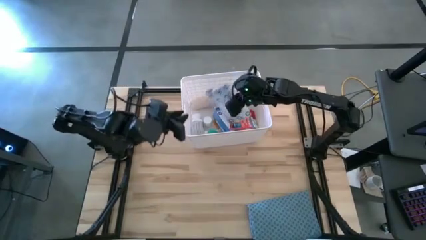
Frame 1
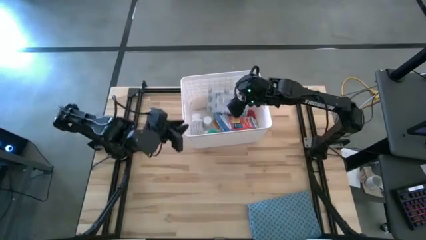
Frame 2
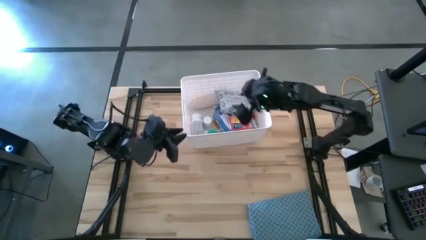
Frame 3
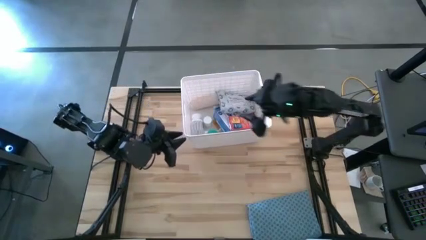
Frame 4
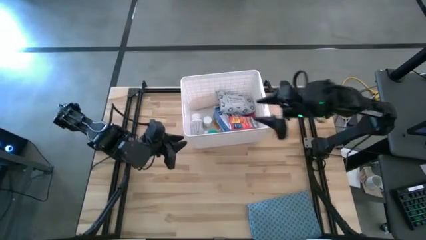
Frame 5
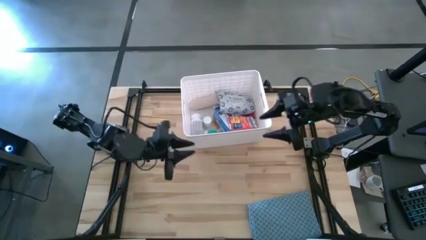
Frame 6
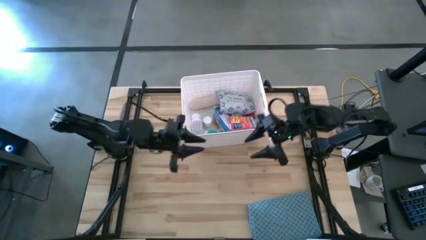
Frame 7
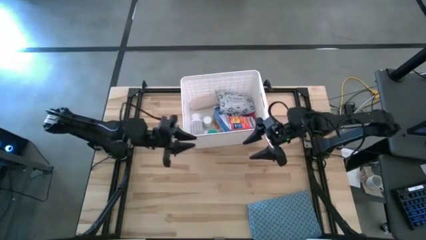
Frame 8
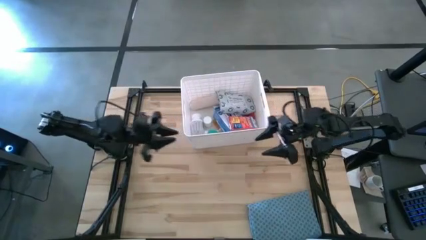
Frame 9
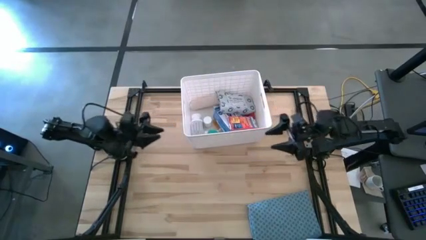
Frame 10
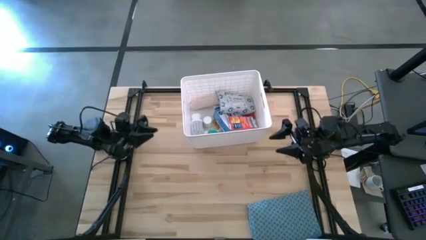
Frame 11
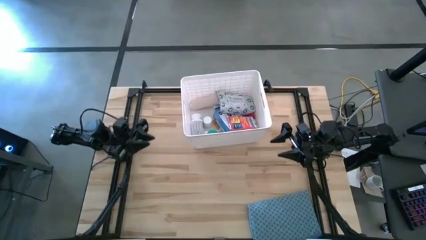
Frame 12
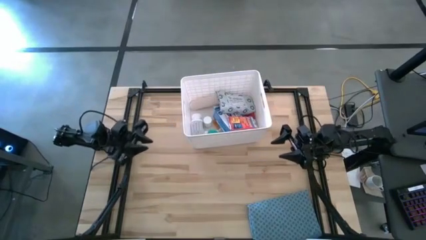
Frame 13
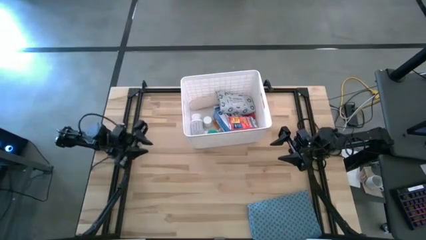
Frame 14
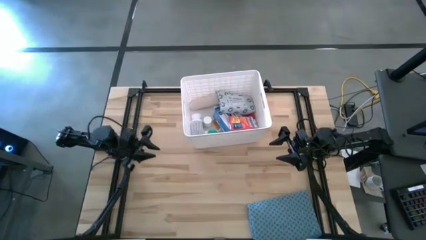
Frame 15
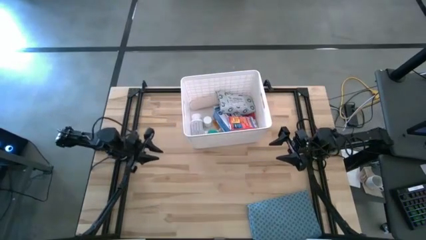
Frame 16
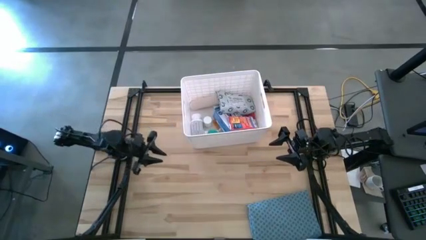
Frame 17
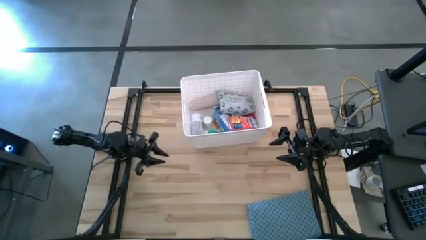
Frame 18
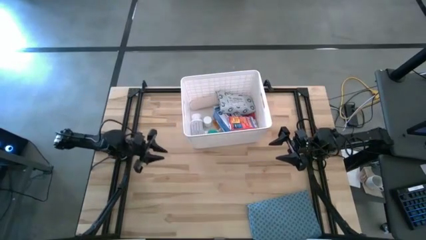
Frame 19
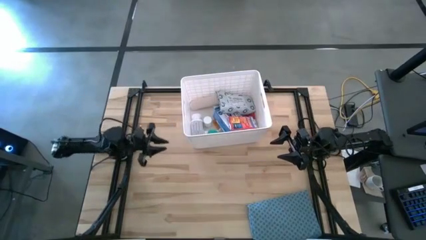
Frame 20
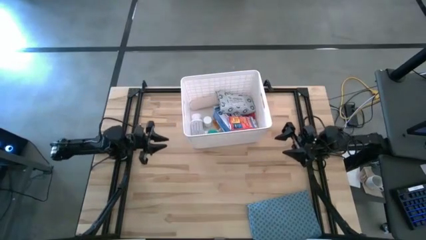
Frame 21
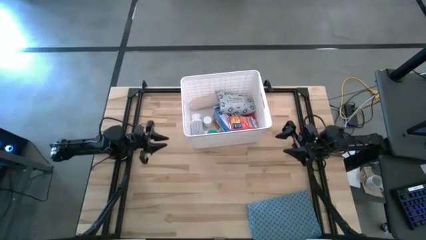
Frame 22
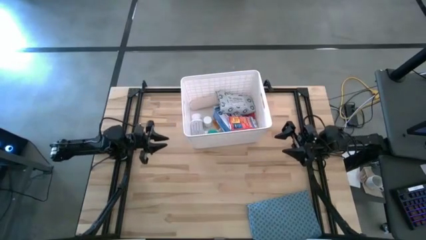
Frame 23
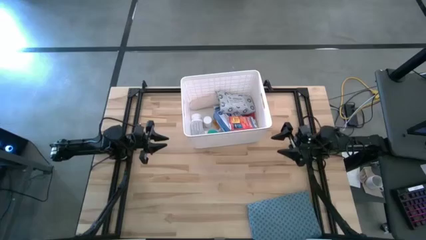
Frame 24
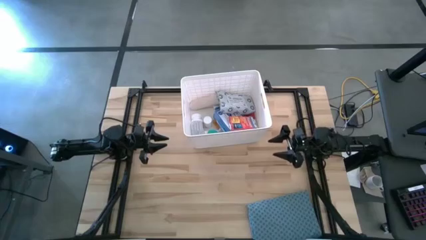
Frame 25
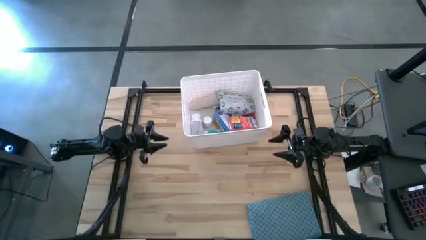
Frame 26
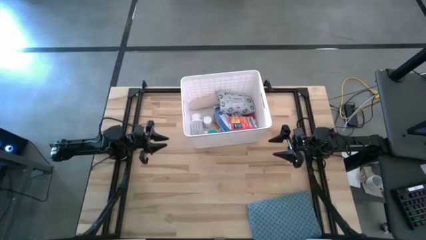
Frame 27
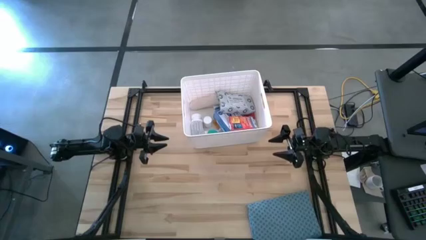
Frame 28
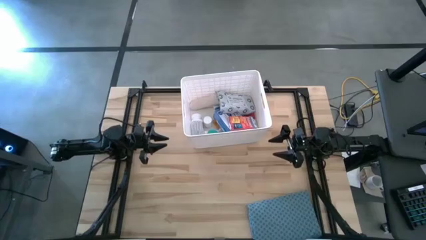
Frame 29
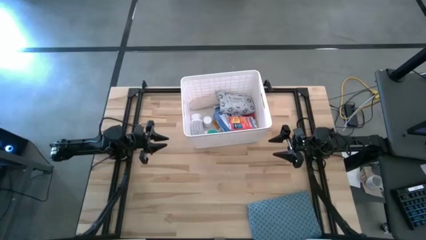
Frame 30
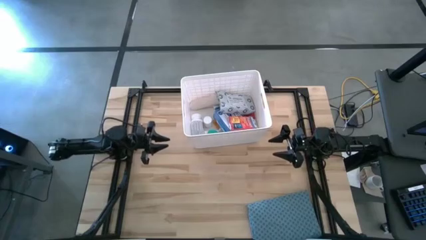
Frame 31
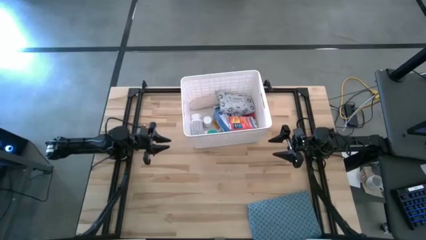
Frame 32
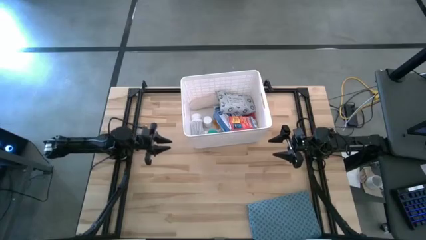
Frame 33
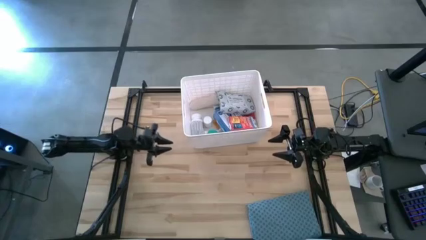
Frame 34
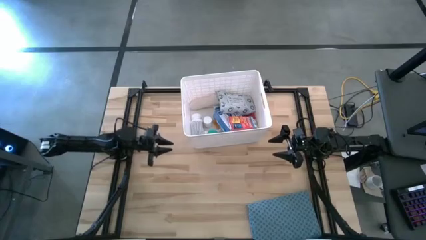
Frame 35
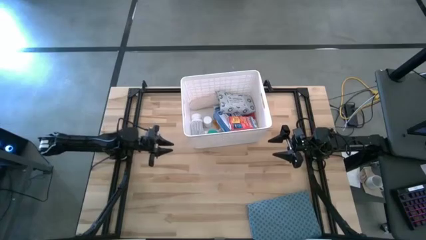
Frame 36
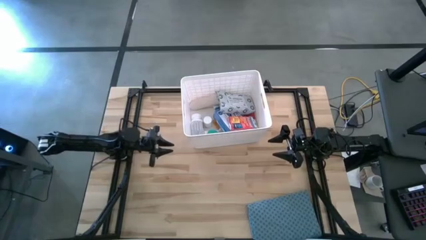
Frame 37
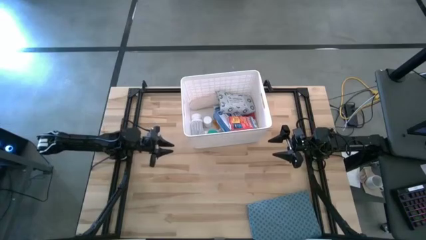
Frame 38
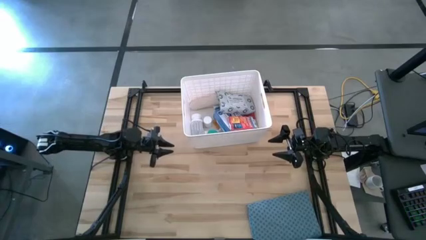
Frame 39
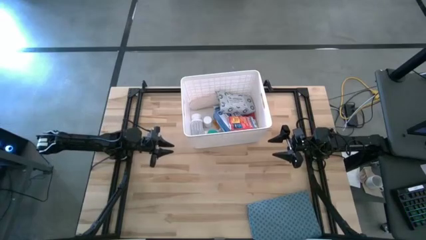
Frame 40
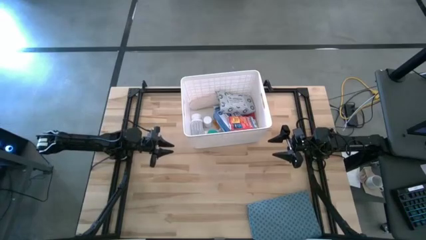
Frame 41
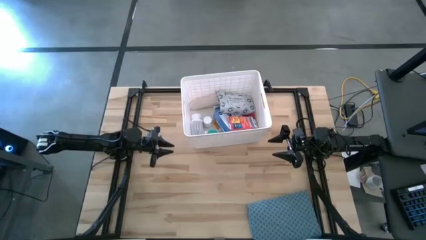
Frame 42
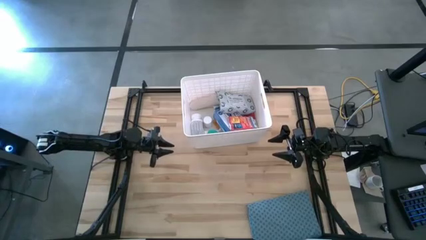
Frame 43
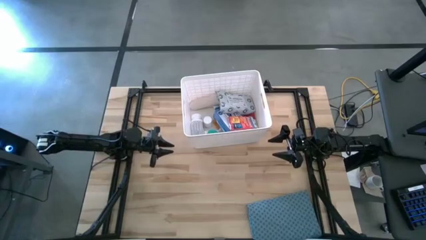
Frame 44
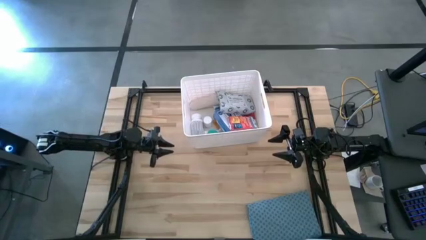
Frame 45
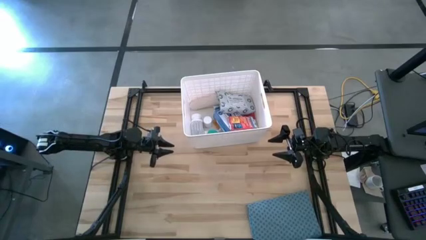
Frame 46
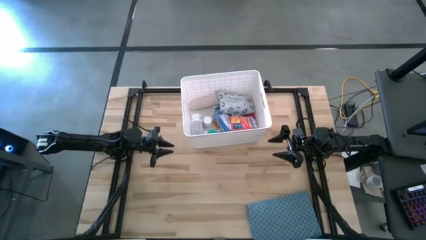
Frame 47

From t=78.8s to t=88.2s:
Task: Pick & place medical supplies in basket/bin
Return to Home Position

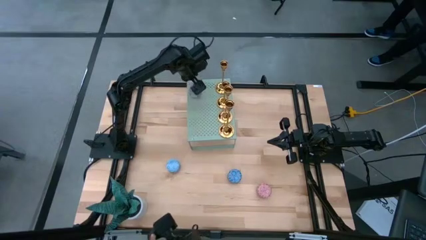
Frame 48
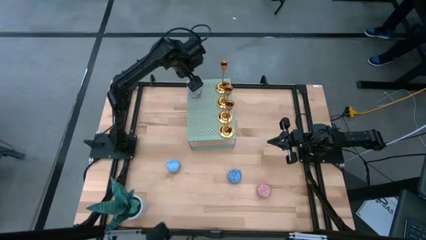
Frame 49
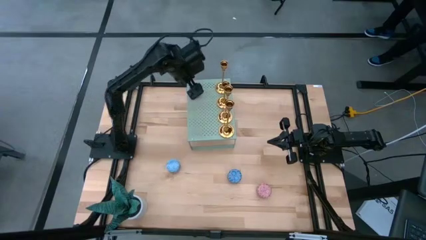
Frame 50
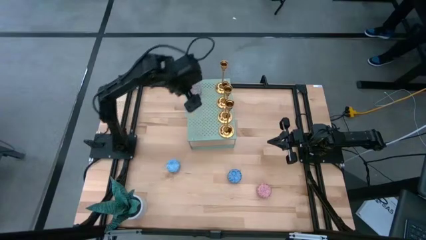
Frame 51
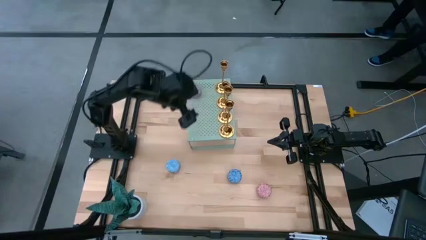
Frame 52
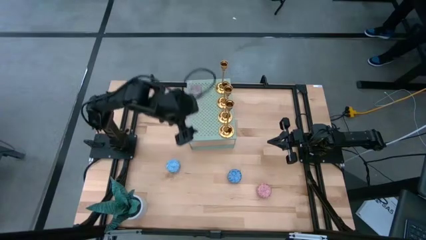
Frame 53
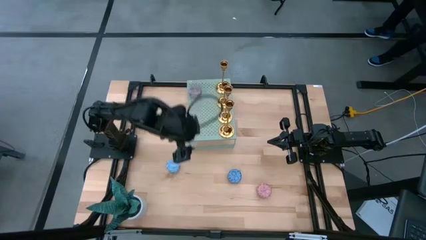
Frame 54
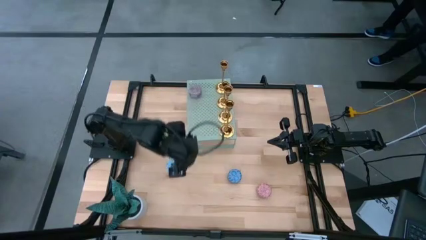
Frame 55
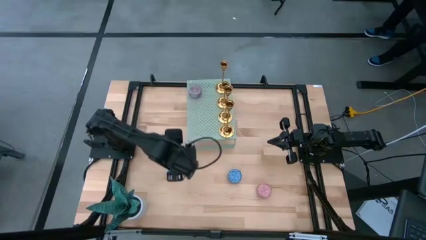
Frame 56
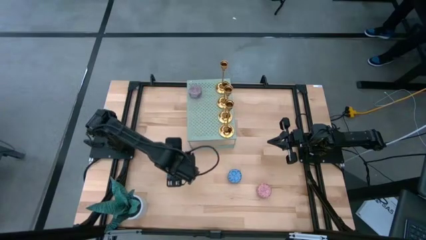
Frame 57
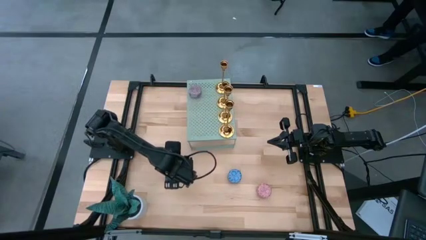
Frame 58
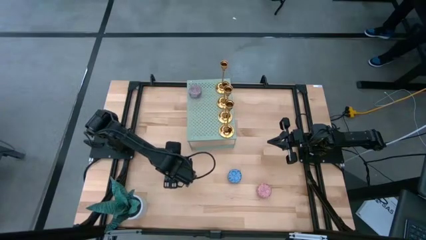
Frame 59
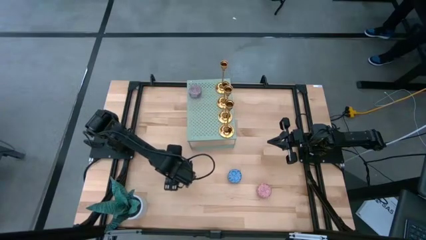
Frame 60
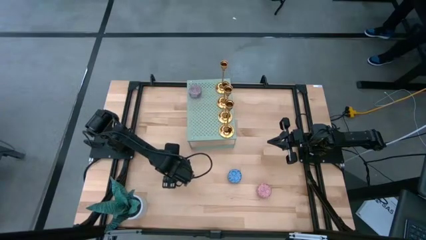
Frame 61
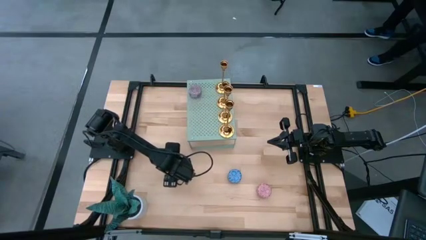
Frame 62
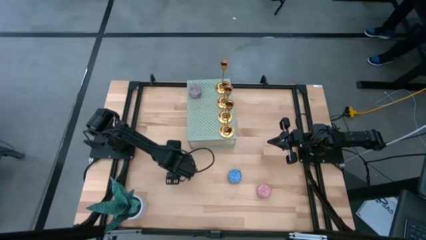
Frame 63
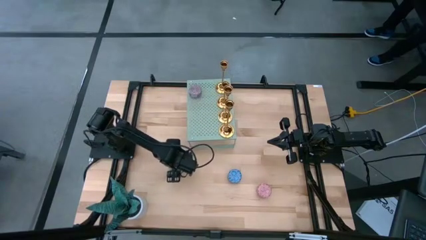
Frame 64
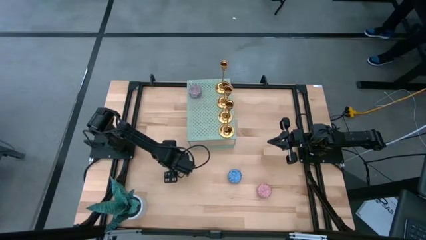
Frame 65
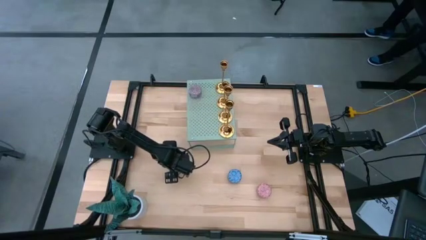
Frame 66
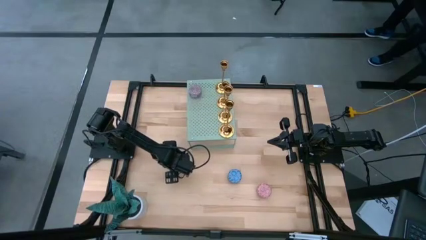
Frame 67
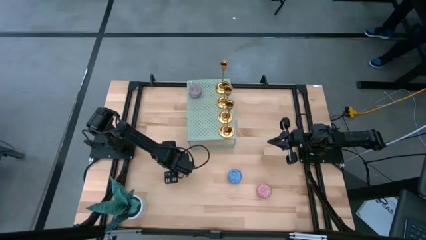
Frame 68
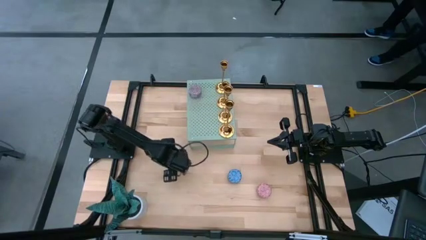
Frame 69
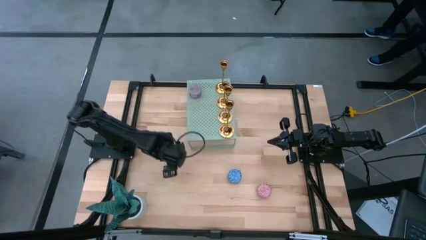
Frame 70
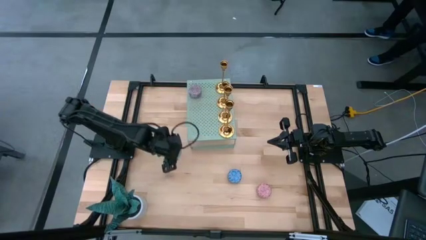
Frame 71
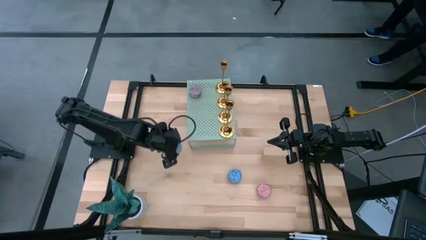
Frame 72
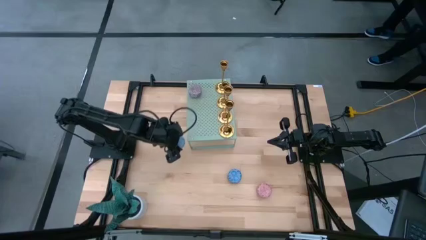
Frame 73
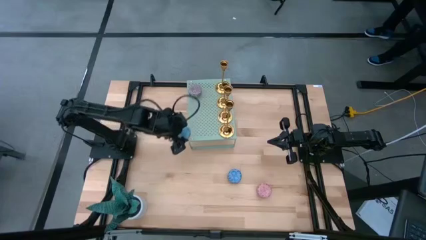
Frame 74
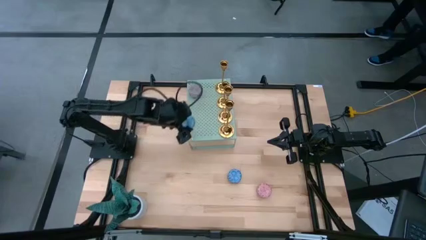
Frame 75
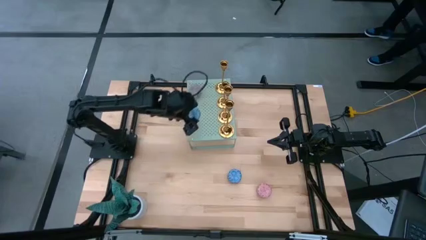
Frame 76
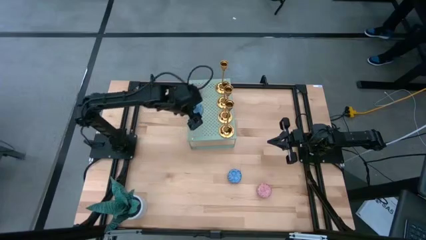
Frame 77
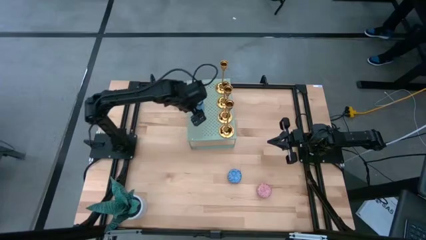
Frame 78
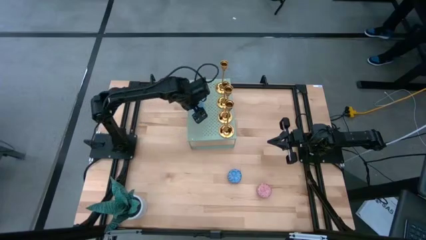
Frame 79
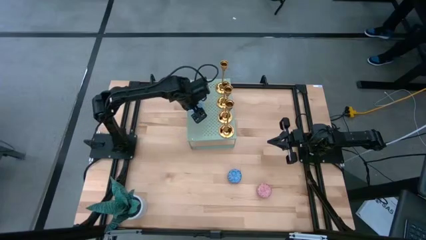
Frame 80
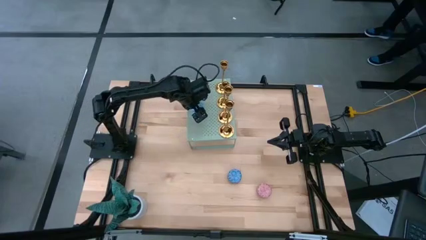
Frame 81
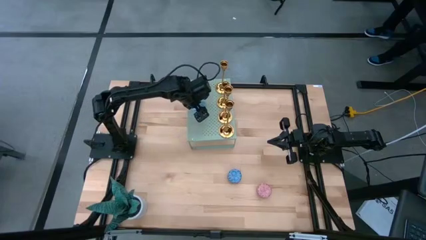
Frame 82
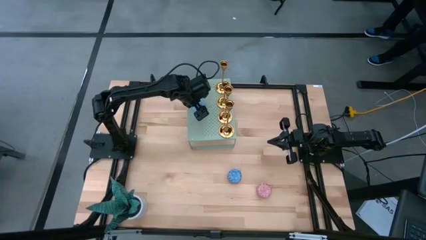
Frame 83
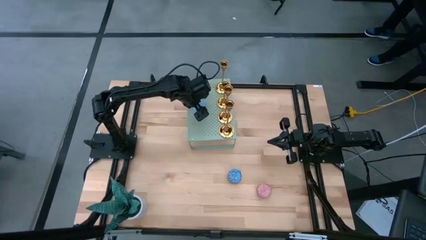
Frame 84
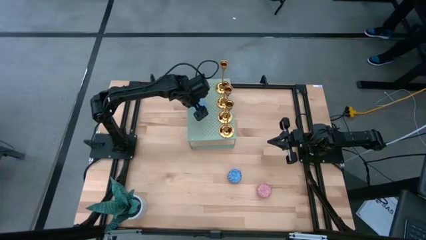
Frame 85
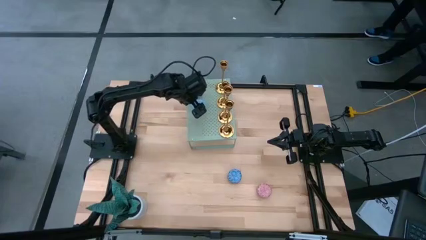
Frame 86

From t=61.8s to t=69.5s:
Task: Pick & Place candle stick holders
Align the light blue scented candle with the other scented candle on the shelf
